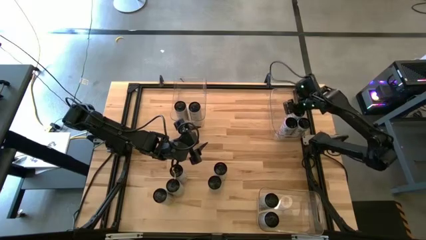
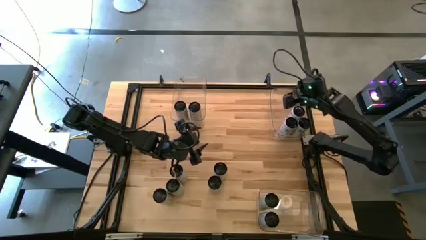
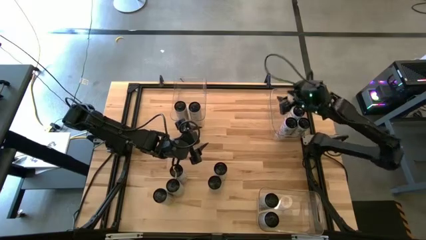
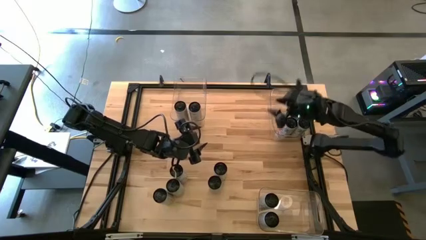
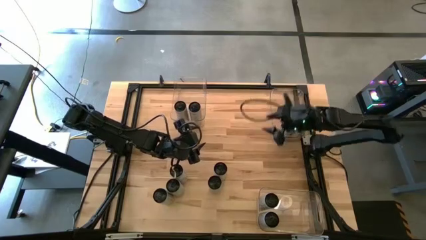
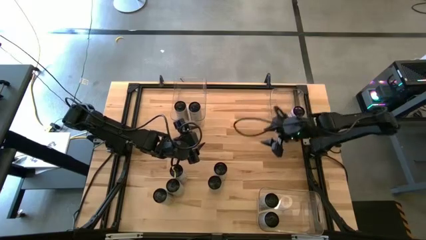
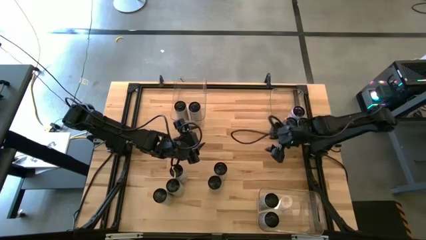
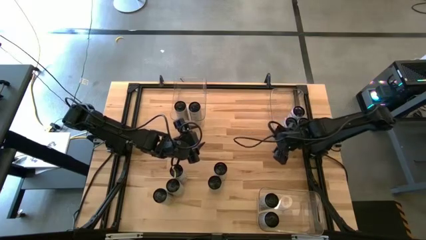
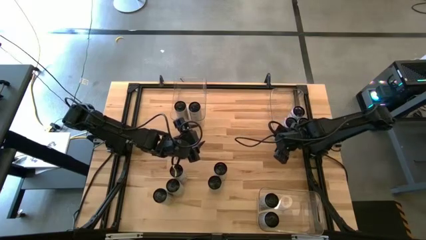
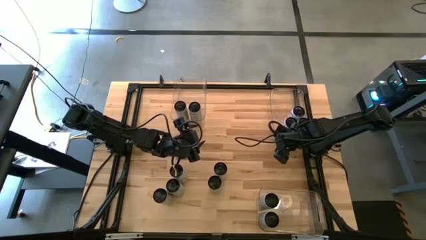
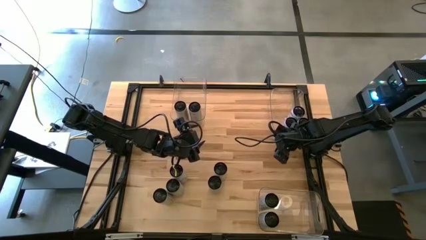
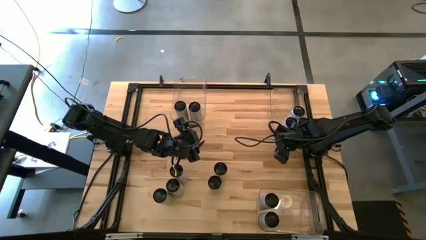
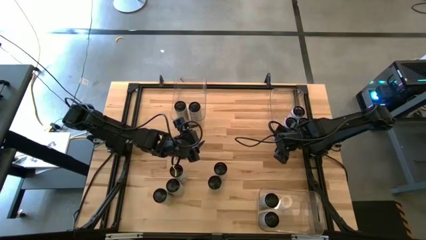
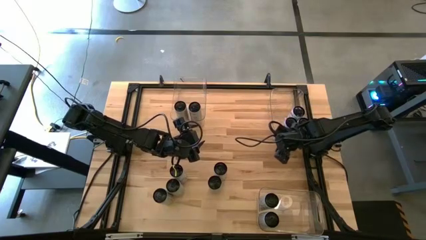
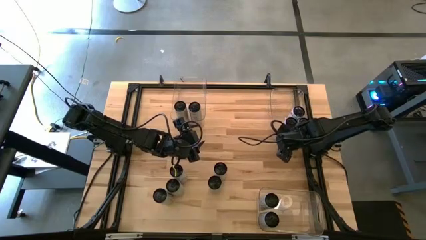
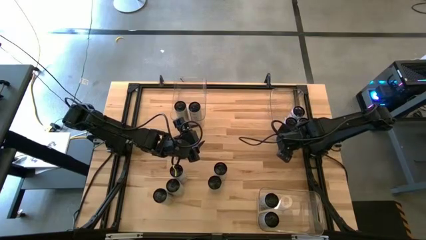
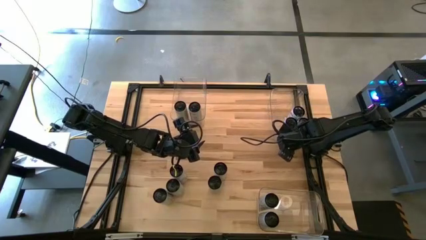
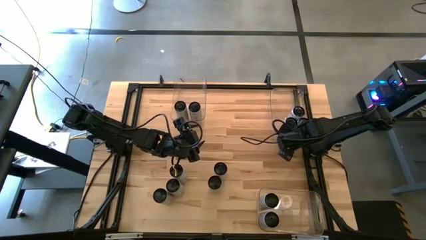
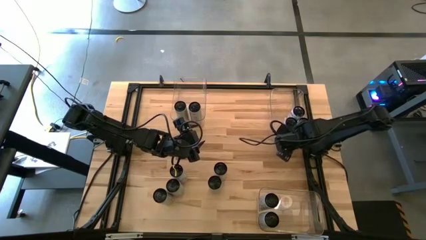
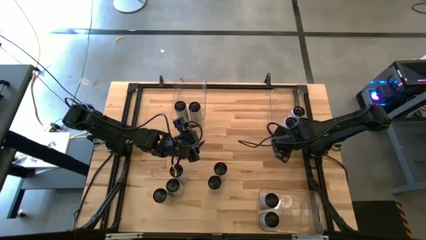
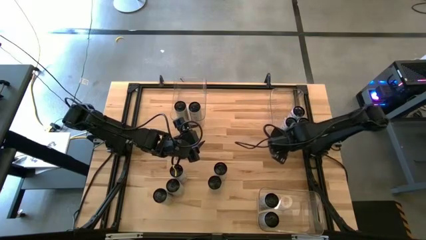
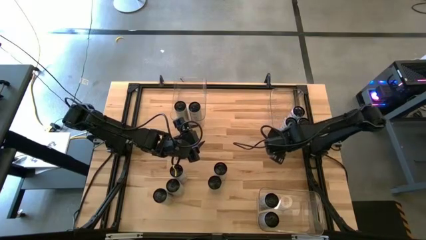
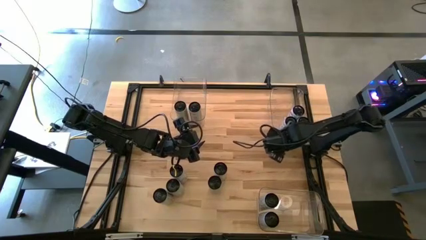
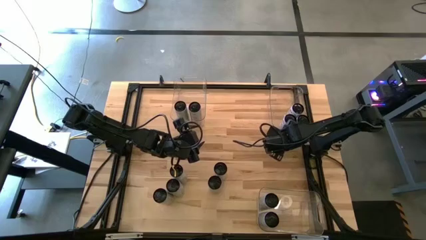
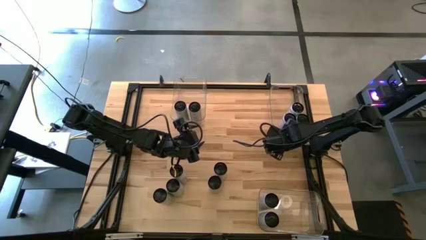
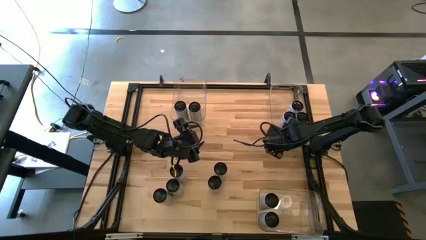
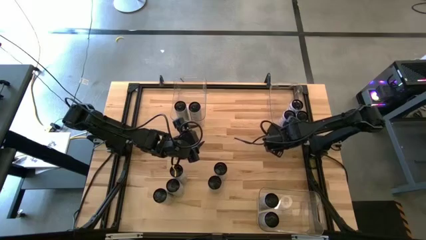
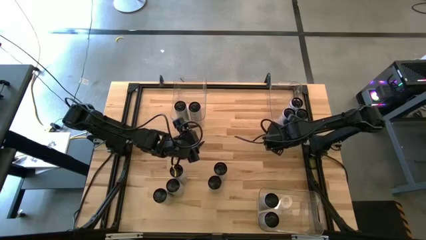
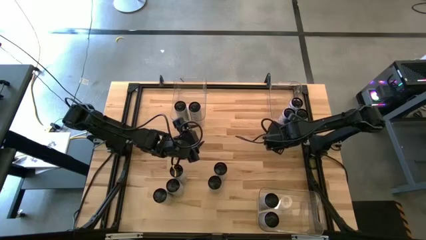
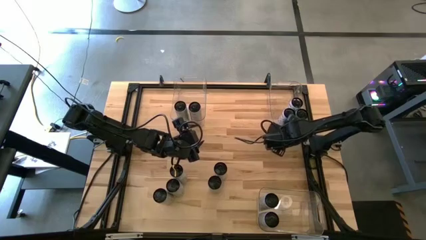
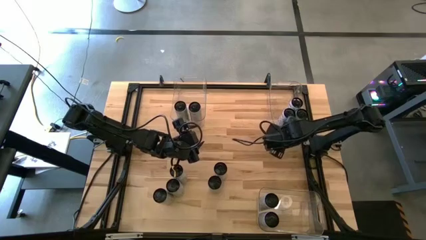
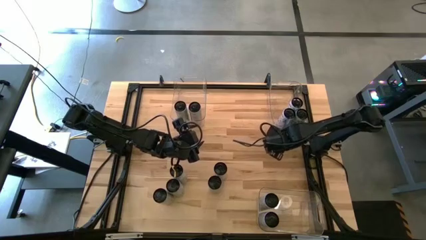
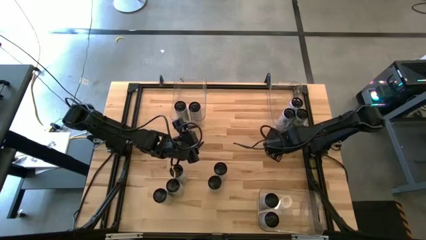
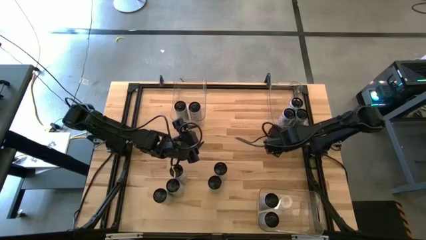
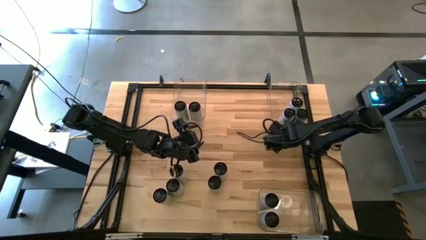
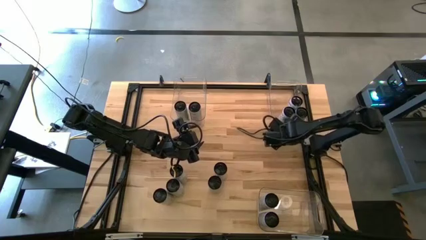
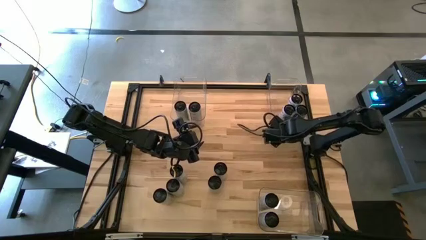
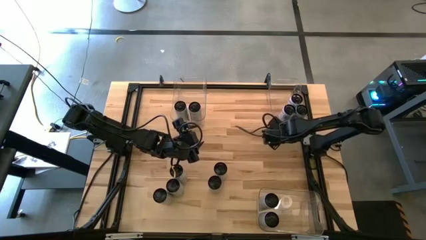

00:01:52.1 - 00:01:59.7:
Task: Sort soda cans
Adjust the top right transparent bin

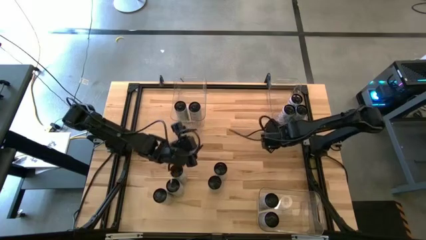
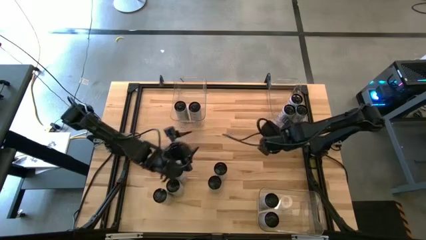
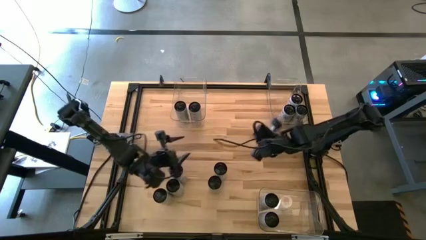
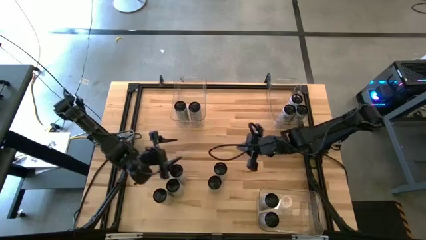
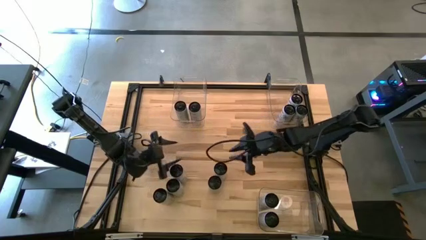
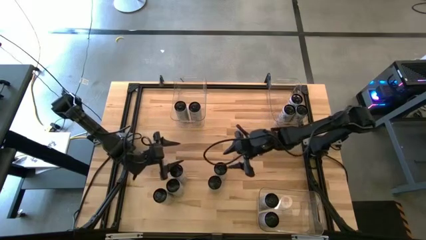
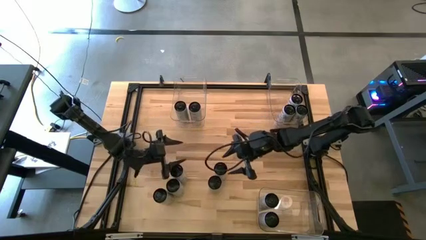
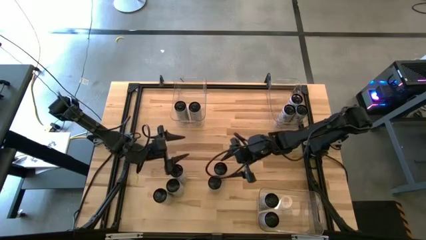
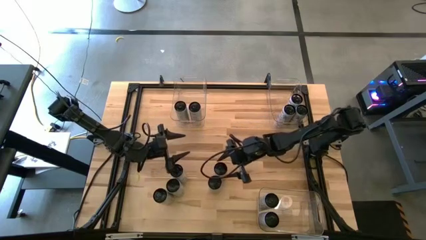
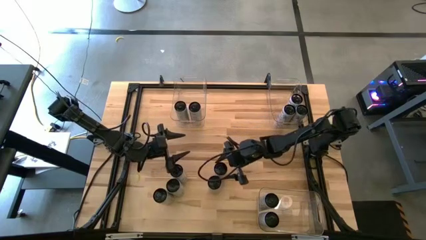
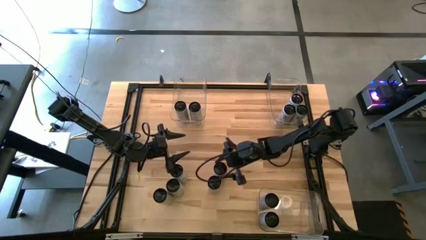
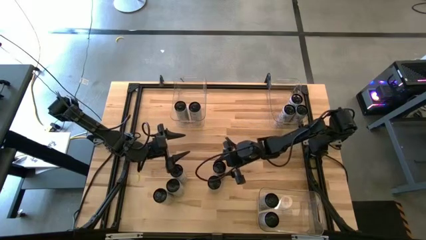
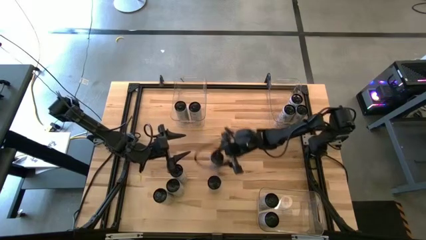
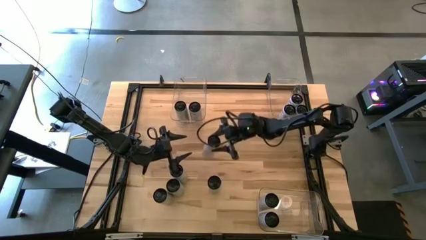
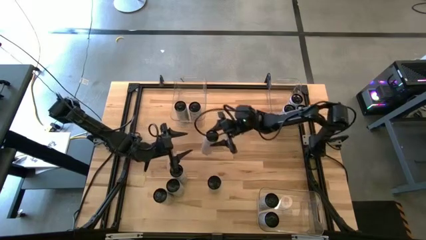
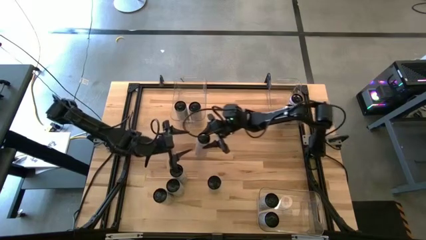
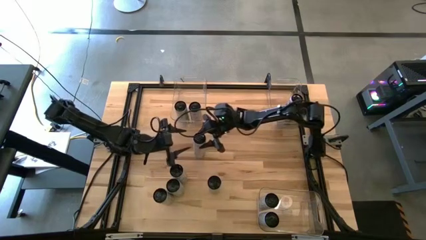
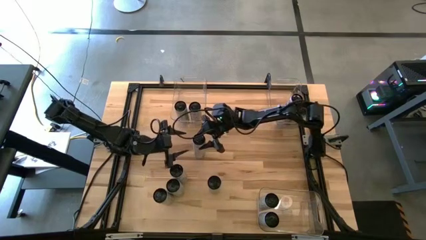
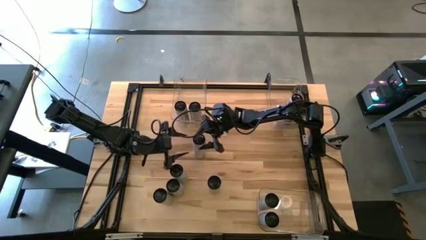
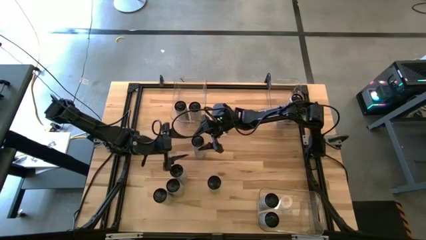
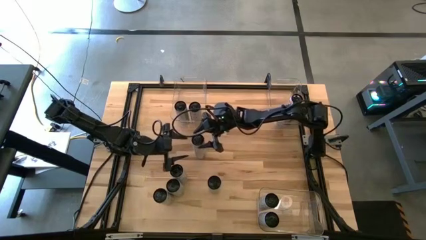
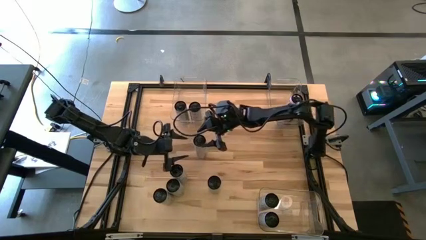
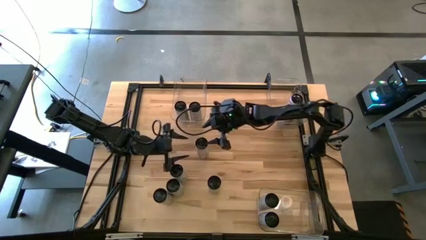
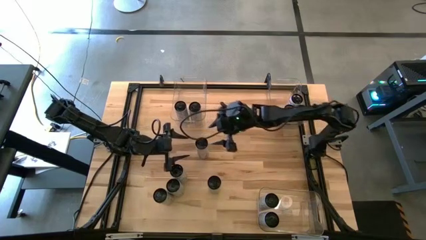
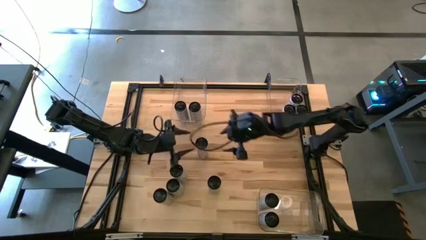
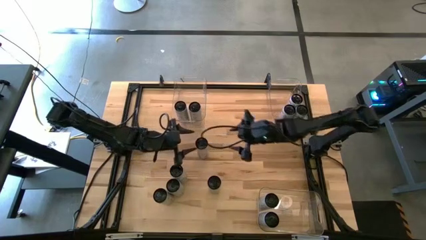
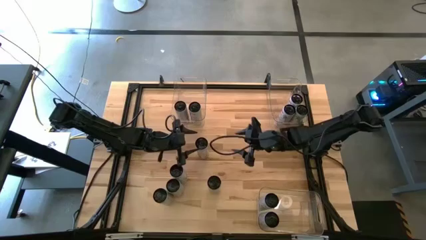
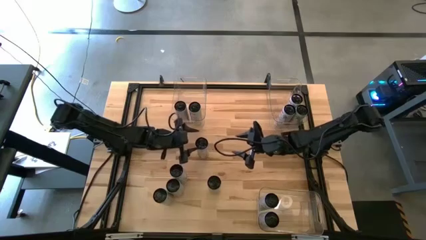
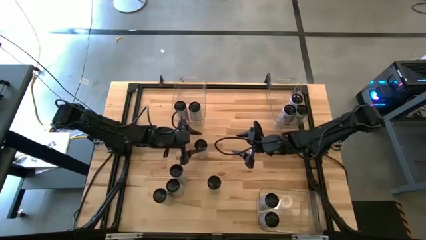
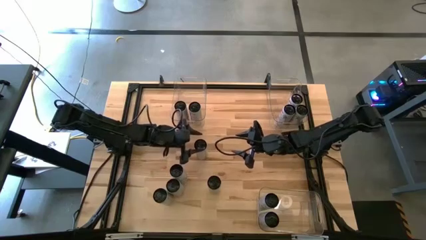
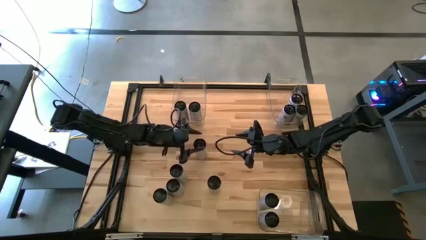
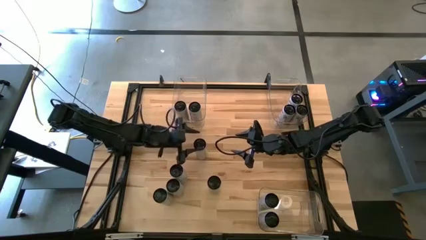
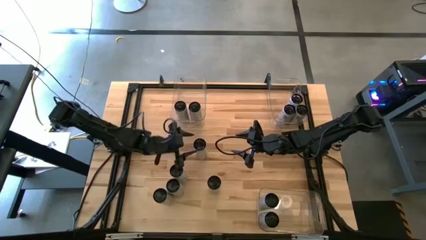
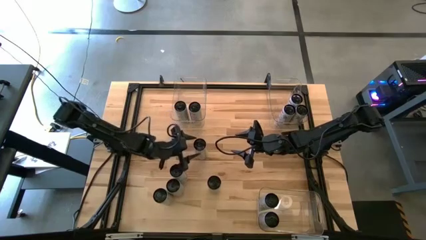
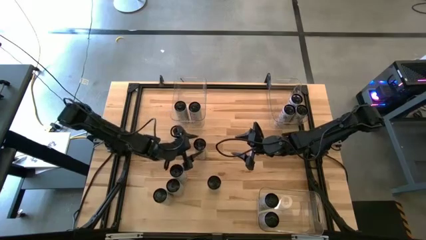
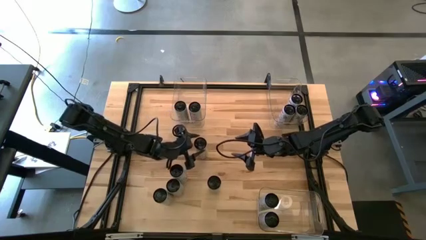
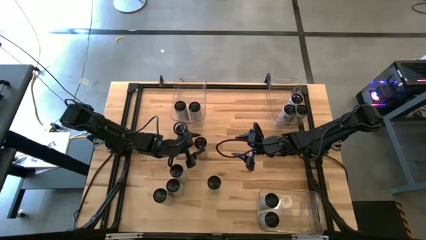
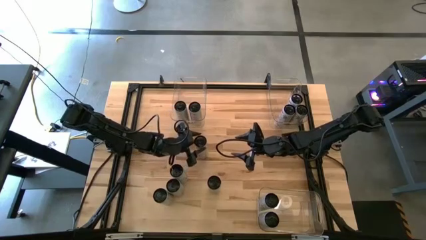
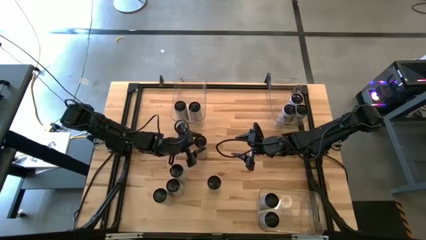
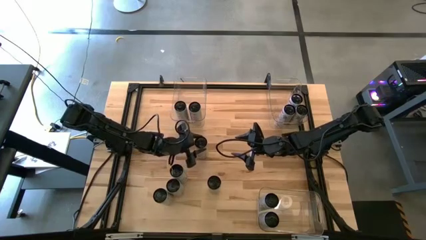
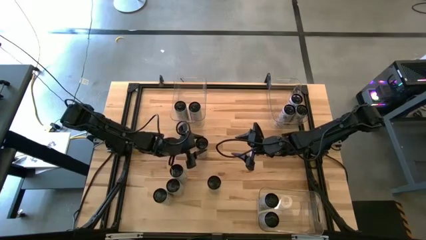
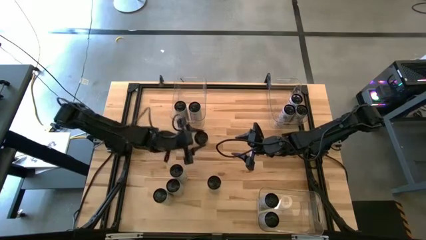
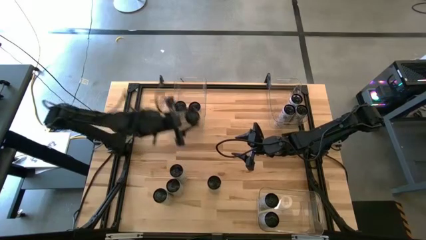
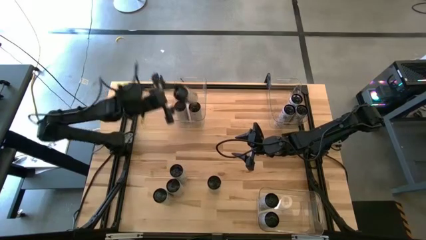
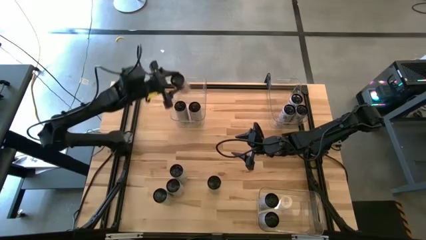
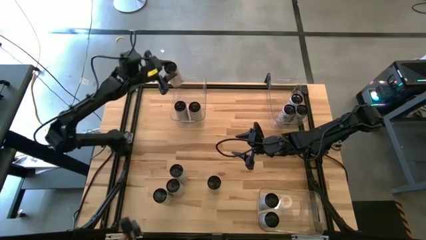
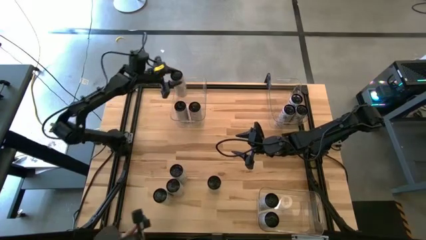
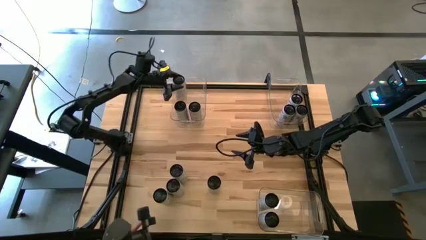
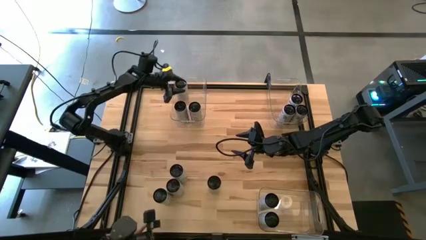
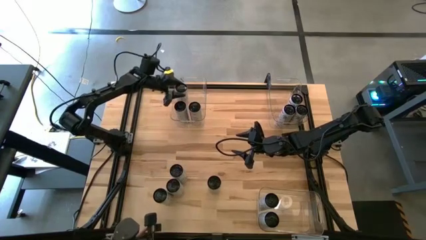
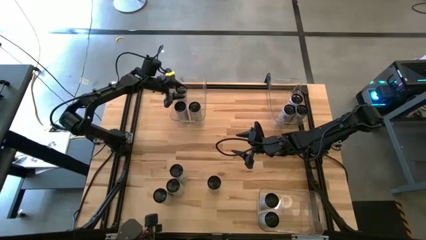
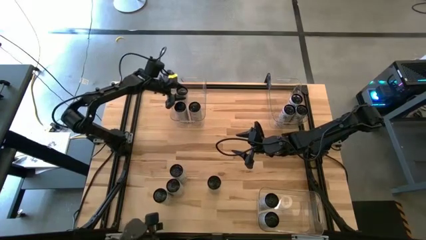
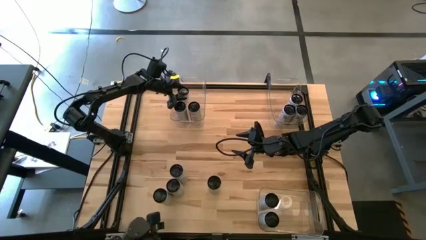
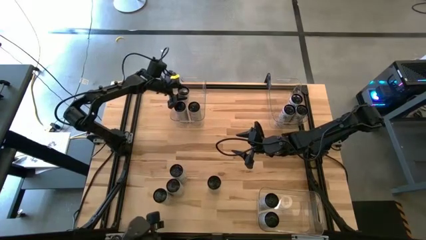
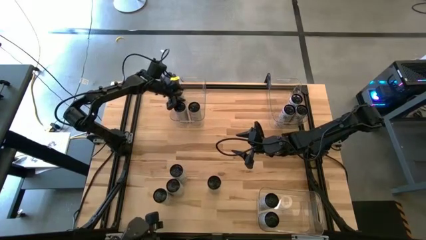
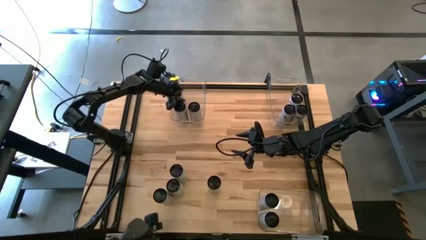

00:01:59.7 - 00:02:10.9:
Put the white/yellow soda can into the top left transparent bin
